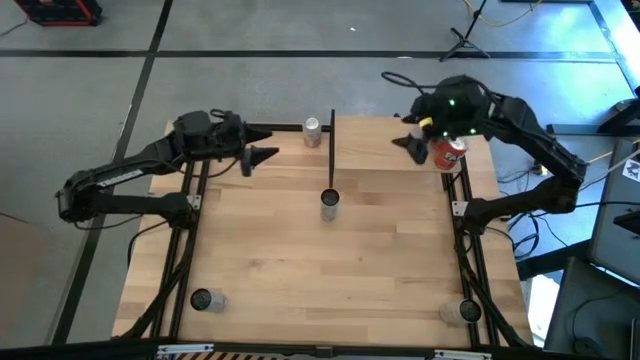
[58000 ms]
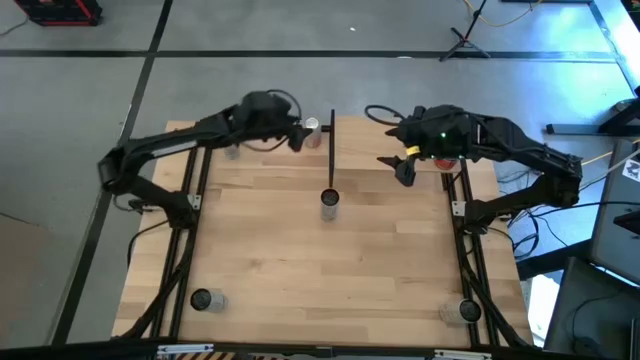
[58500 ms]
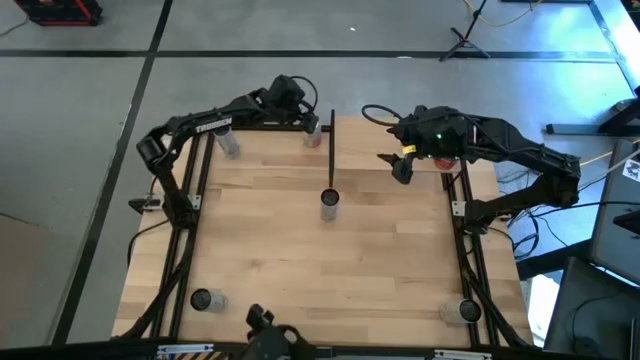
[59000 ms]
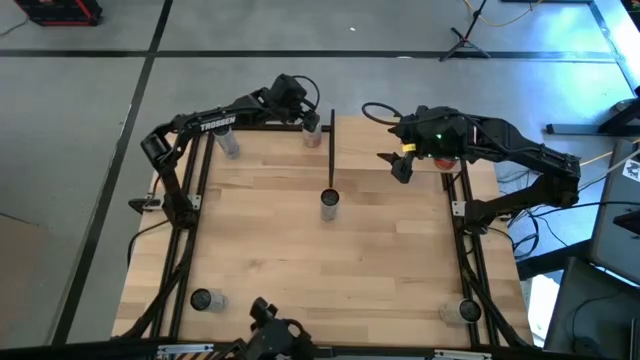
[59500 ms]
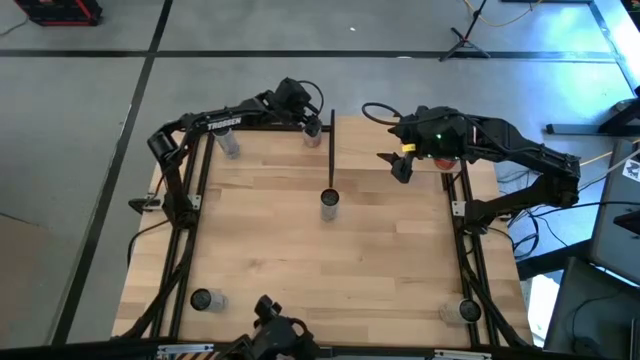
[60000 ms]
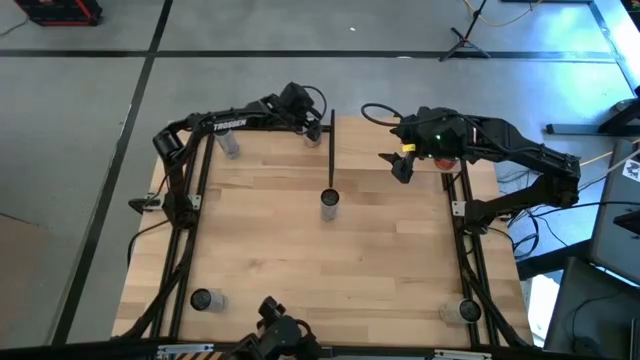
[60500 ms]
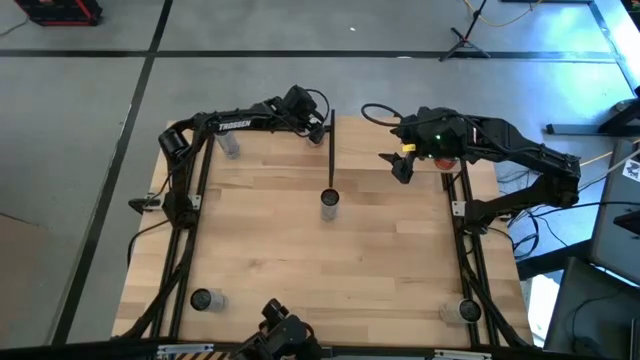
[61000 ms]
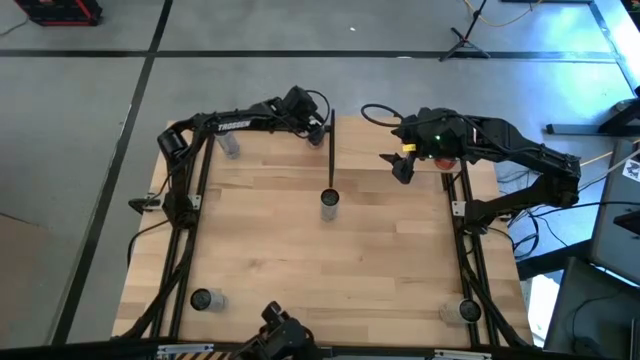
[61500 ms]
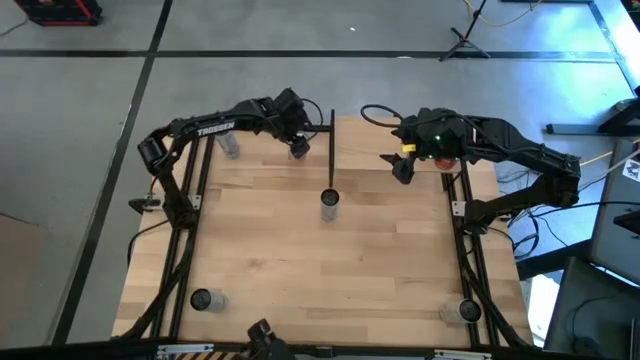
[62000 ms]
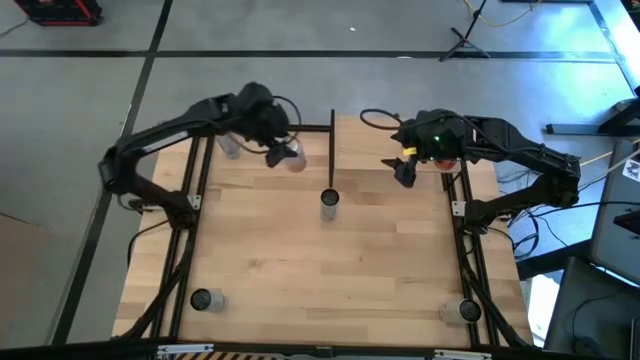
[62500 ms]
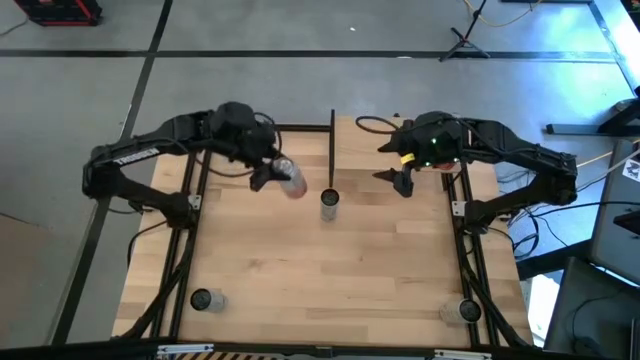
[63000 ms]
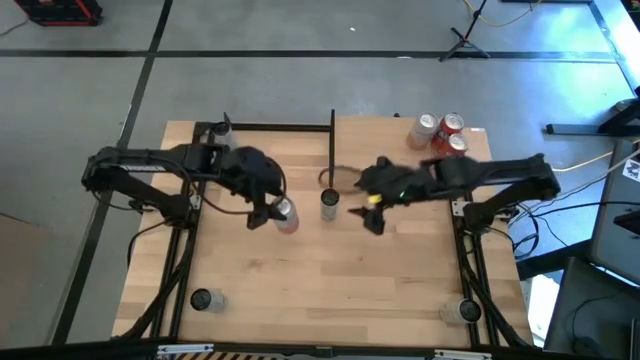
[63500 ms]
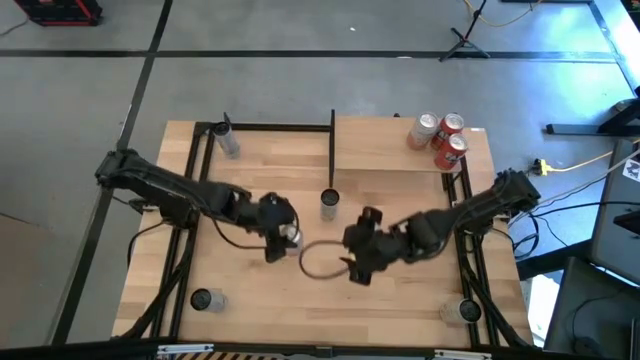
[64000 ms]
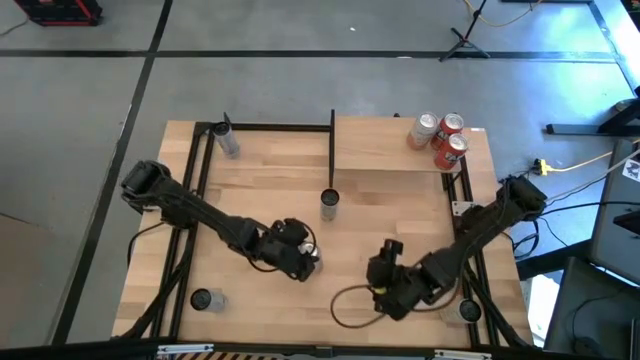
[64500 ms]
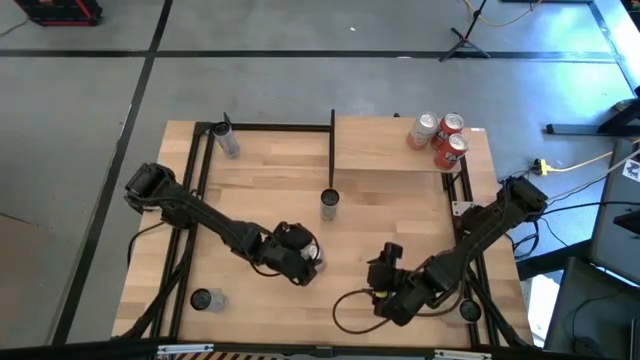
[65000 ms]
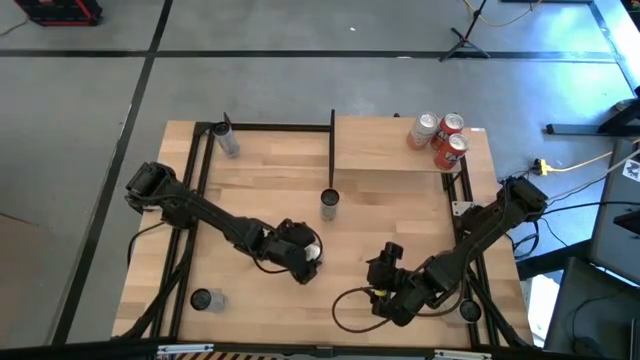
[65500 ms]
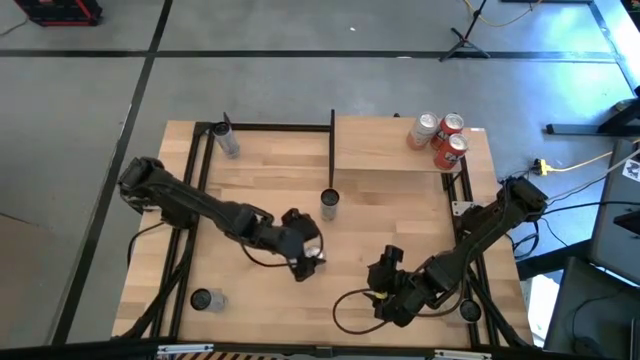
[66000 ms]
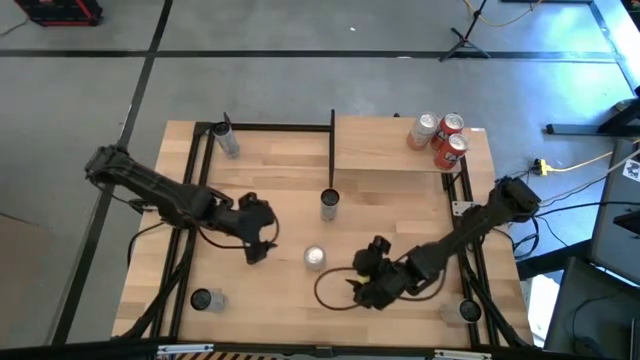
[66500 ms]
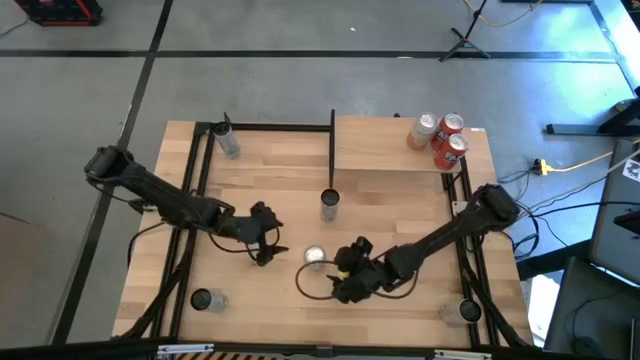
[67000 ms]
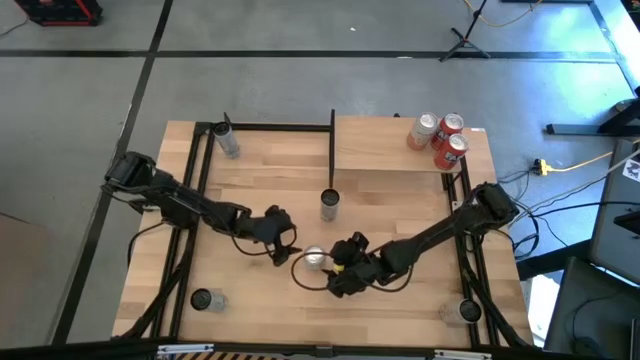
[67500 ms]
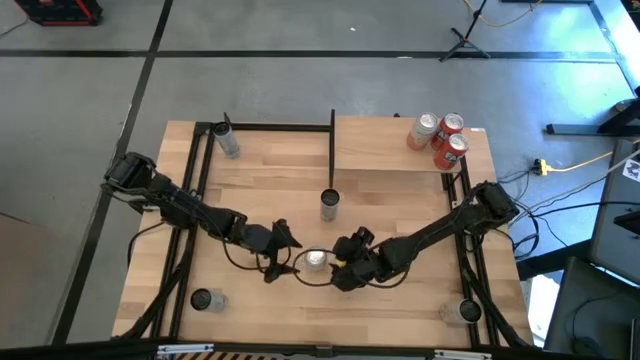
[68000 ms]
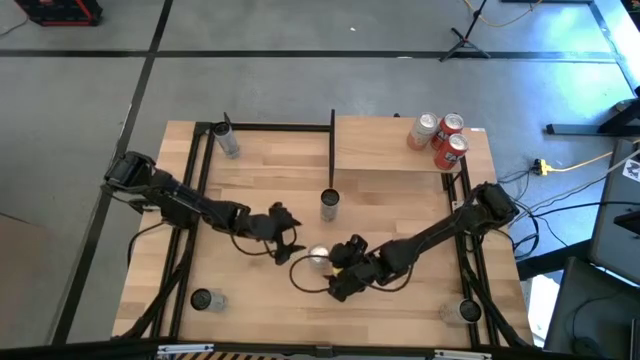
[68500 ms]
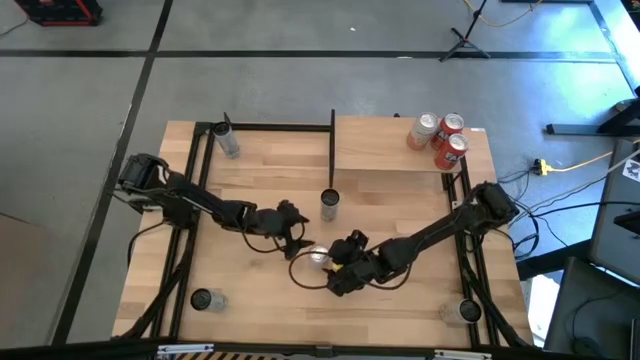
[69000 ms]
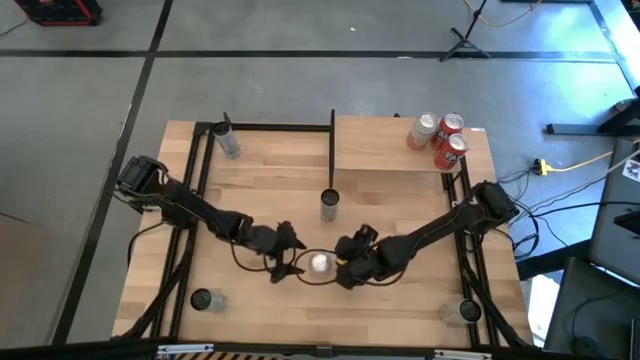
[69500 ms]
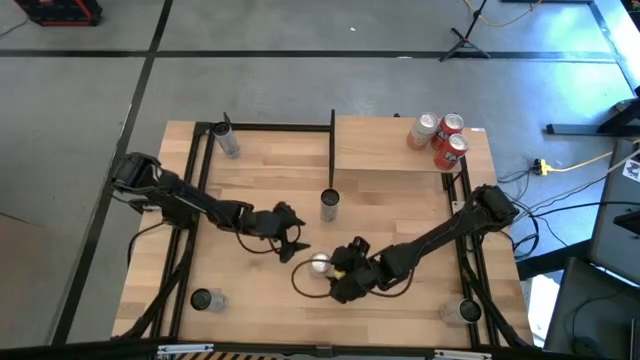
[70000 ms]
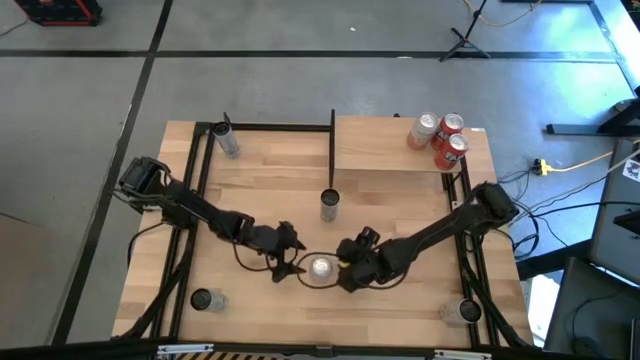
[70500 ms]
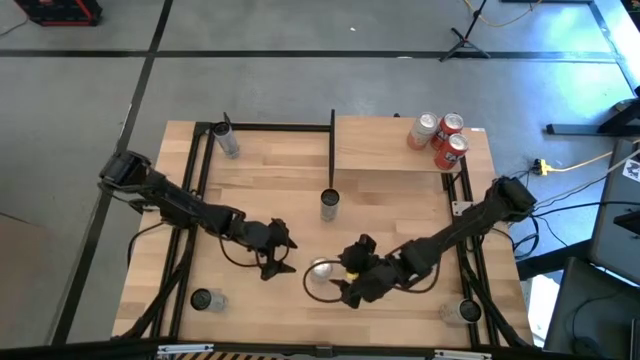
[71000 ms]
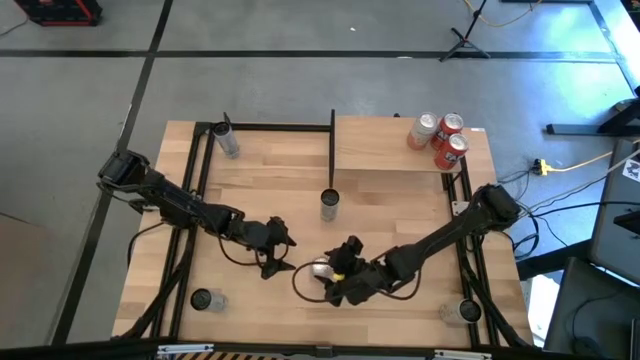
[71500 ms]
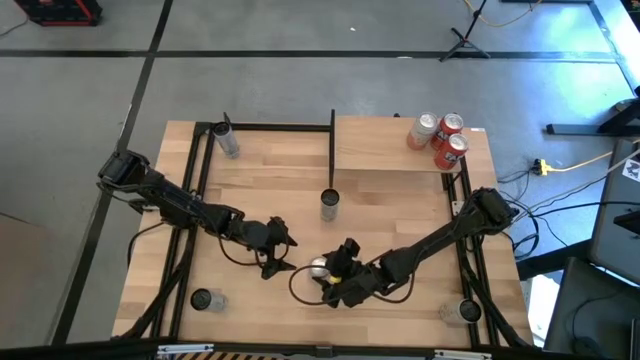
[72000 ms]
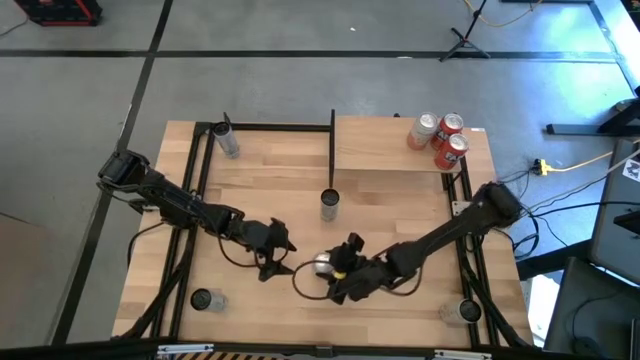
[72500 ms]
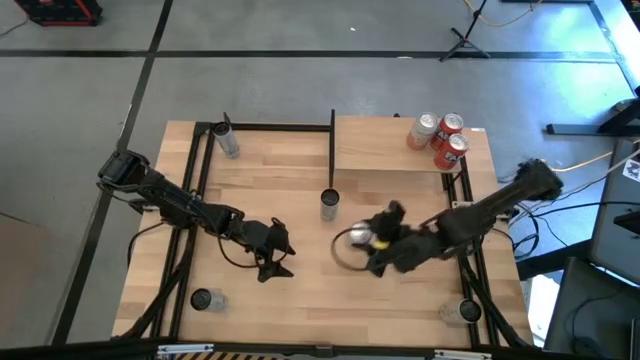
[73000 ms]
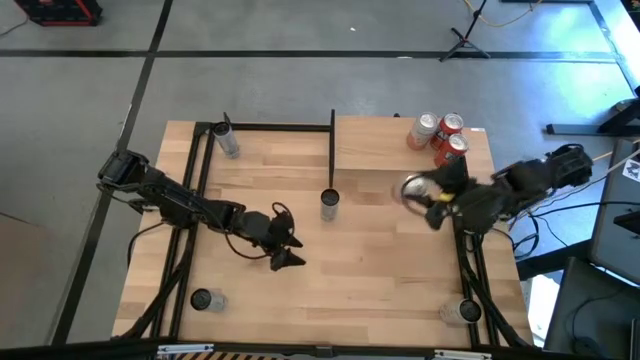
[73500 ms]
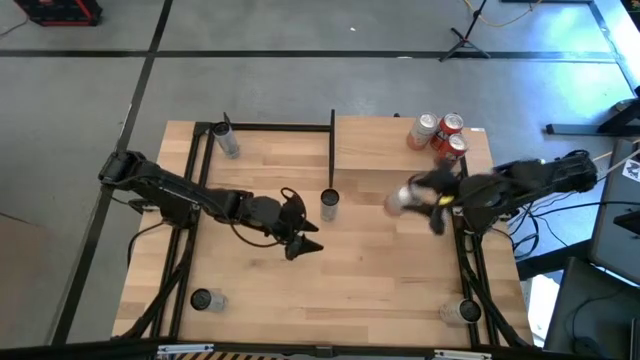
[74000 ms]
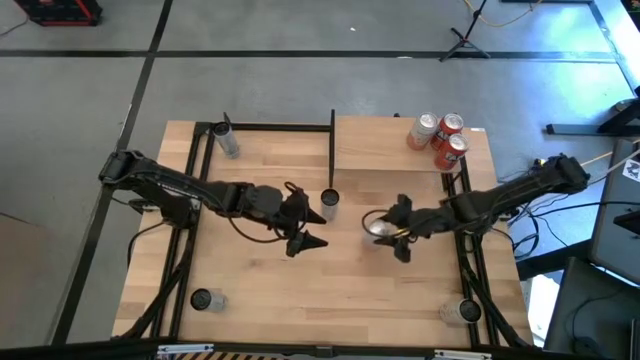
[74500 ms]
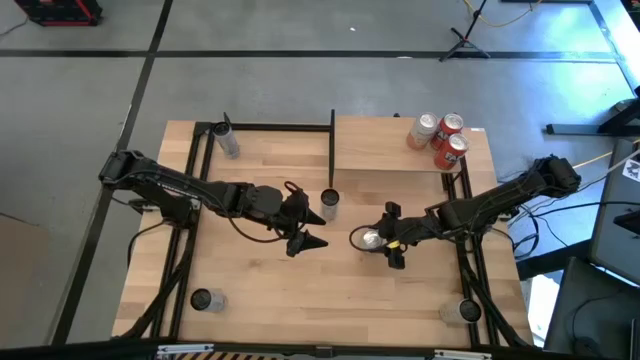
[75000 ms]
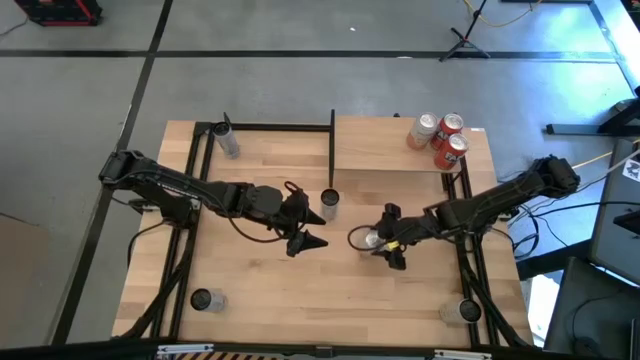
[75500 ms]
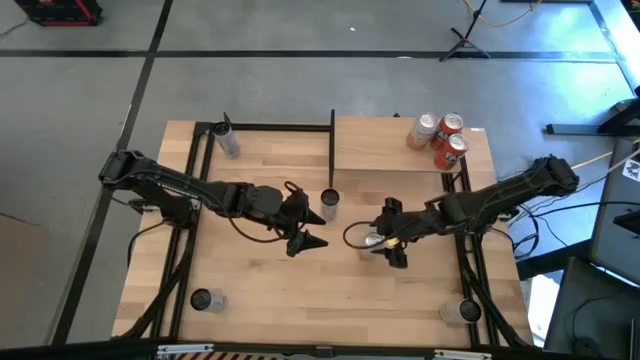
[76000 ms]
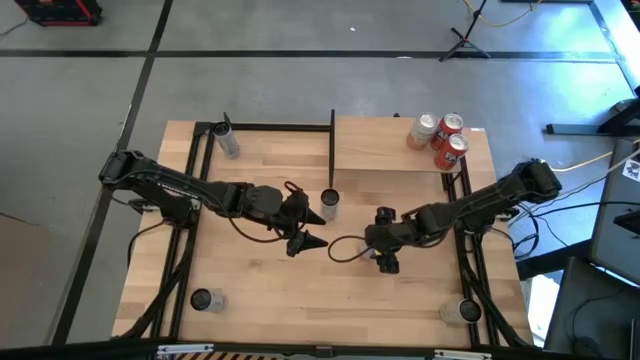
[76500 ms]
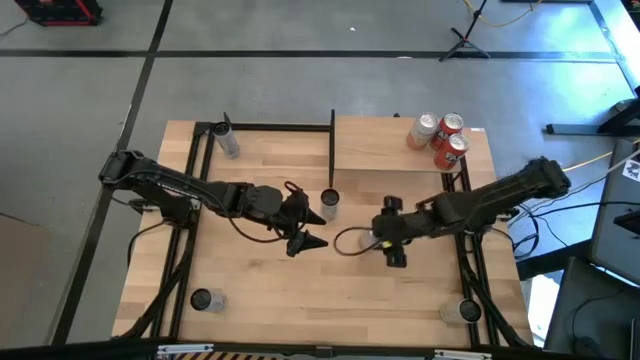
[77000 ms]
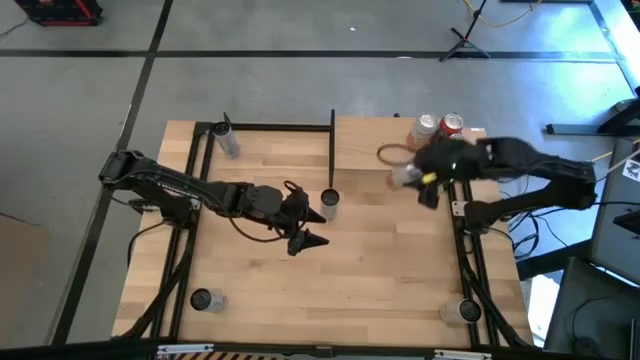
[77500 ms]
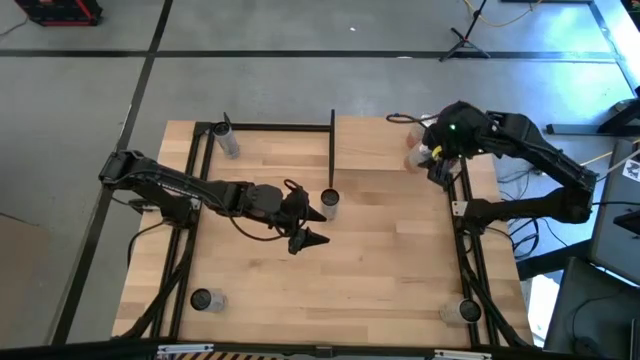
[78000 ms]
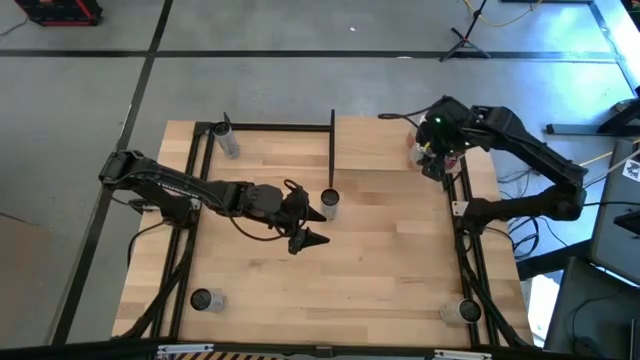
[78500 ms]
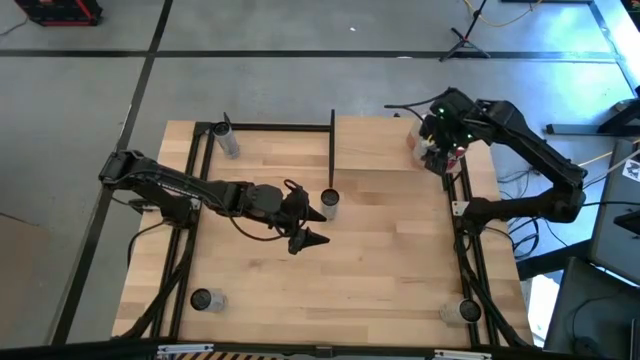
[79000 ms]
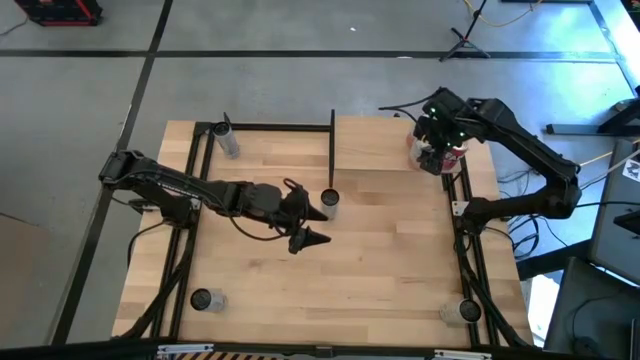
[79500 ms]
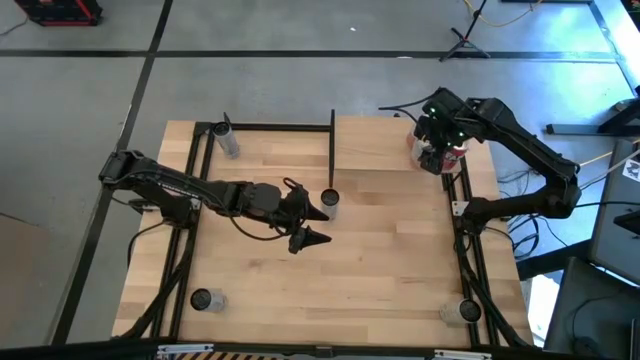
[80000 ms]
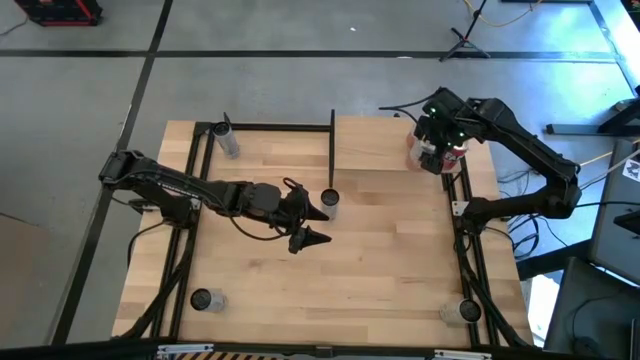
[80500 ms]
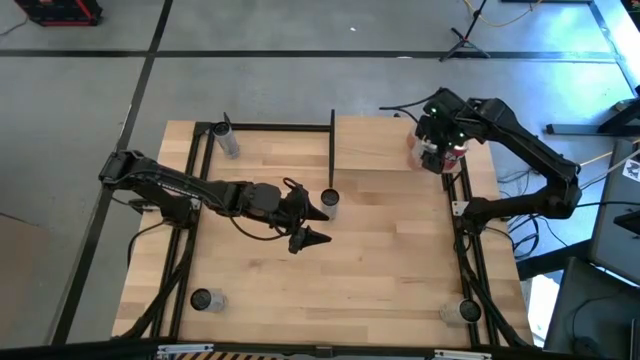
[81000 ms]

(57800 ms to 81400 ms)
Task: Place canned beverage on shelf
Put the orange can on the shelf aligned with the other orange soda can
